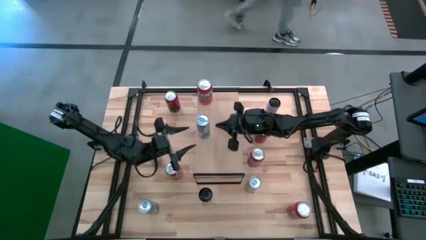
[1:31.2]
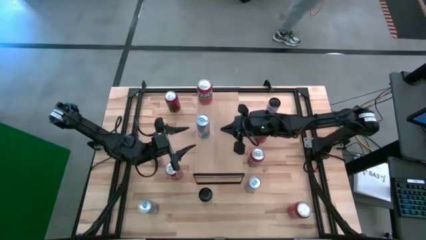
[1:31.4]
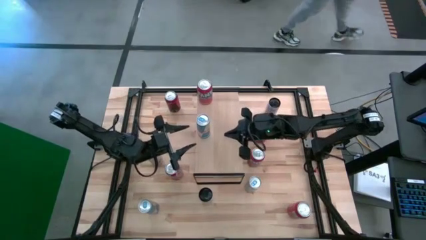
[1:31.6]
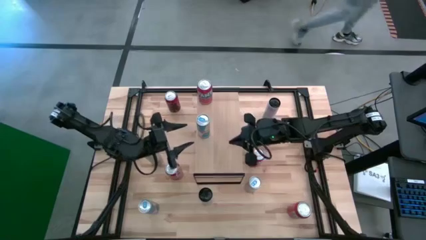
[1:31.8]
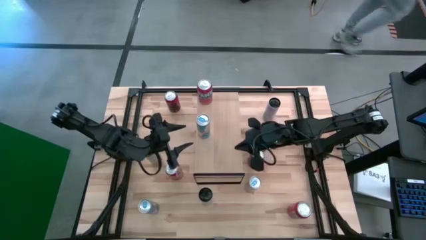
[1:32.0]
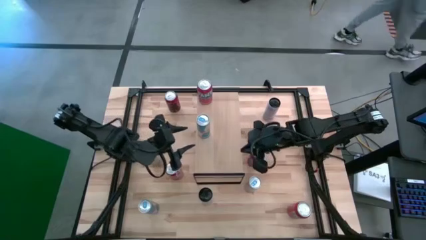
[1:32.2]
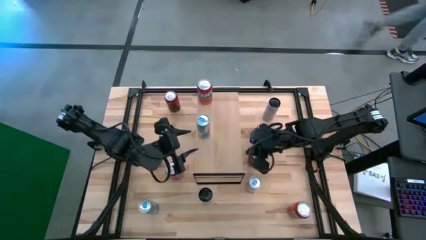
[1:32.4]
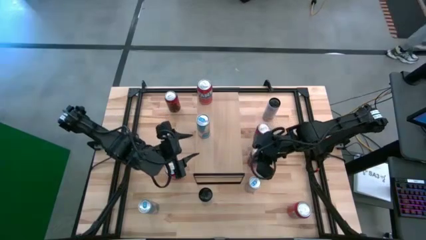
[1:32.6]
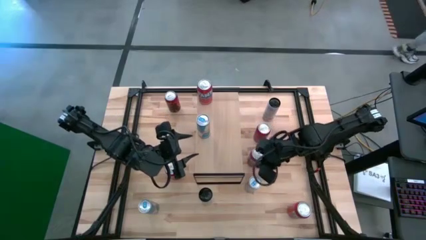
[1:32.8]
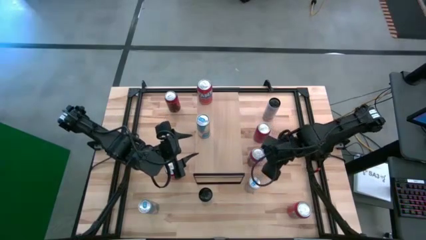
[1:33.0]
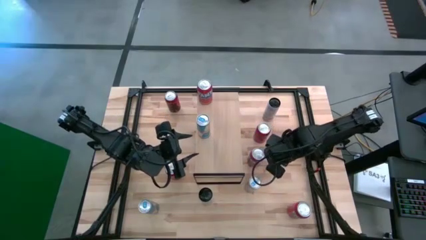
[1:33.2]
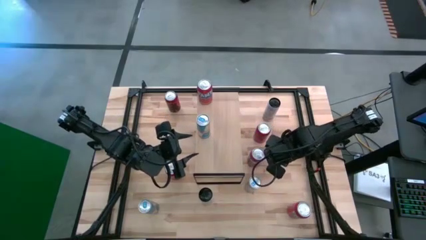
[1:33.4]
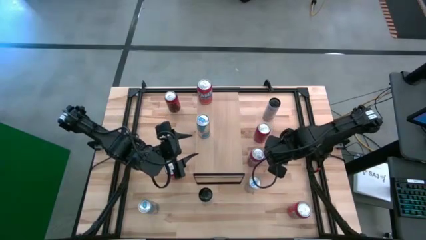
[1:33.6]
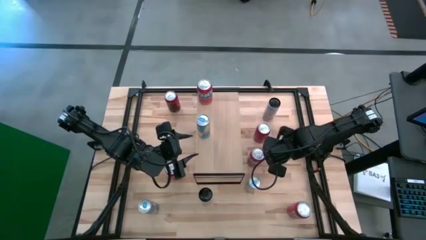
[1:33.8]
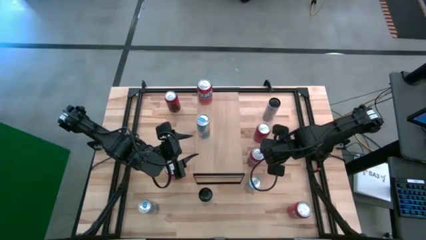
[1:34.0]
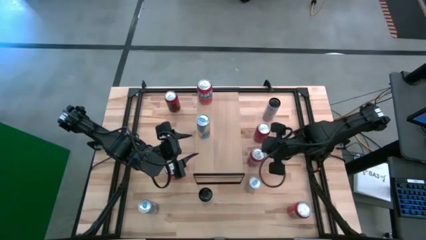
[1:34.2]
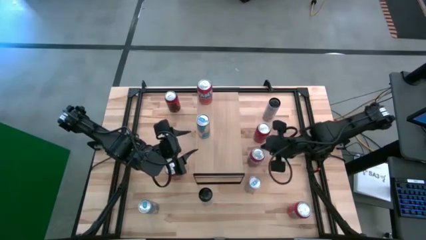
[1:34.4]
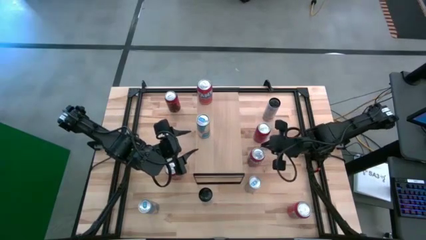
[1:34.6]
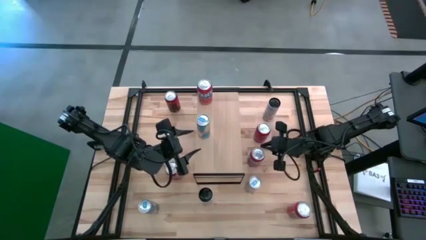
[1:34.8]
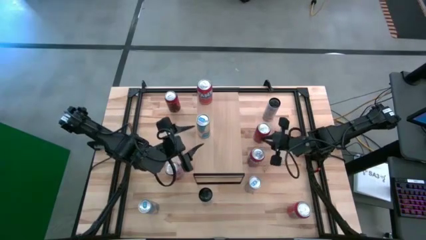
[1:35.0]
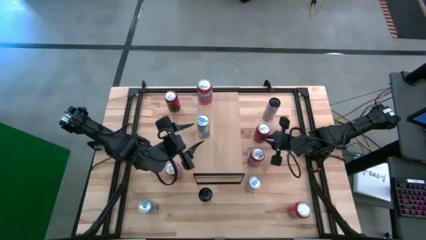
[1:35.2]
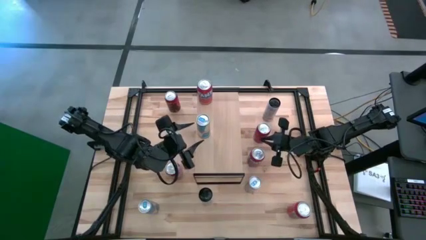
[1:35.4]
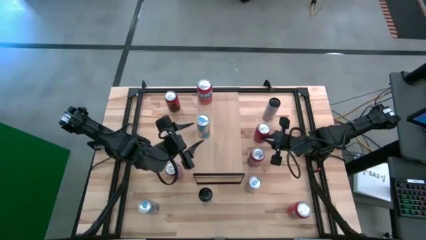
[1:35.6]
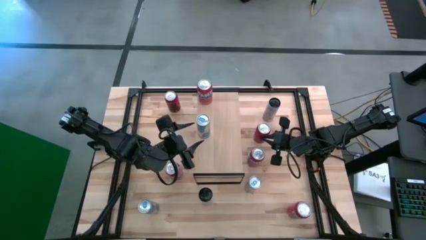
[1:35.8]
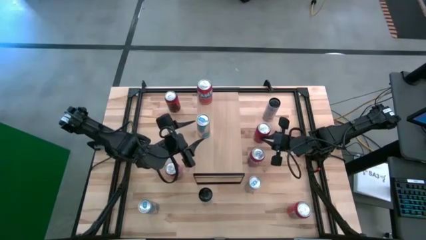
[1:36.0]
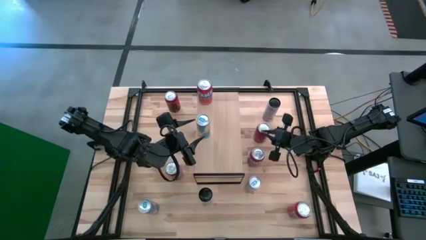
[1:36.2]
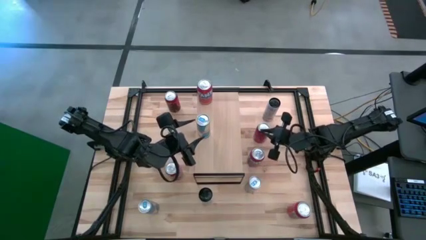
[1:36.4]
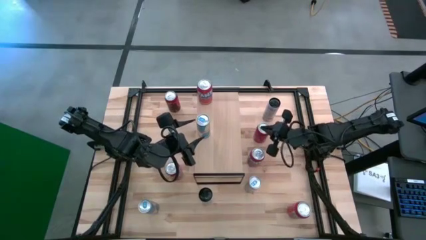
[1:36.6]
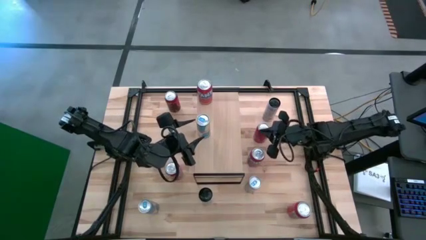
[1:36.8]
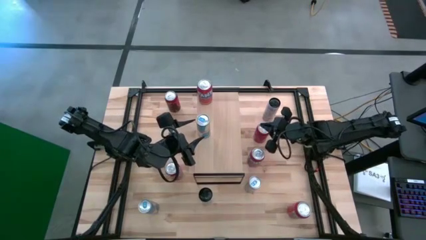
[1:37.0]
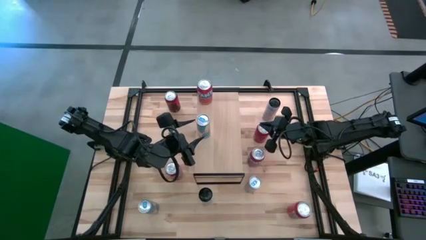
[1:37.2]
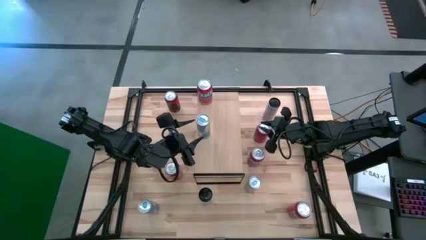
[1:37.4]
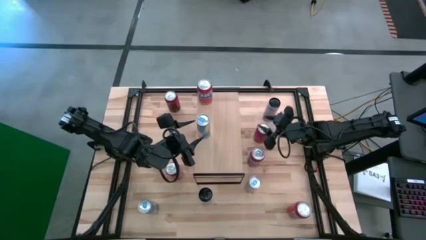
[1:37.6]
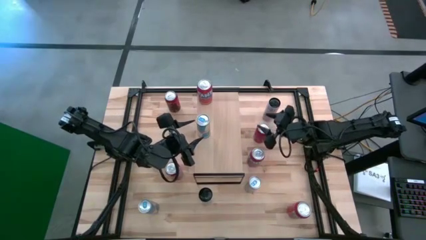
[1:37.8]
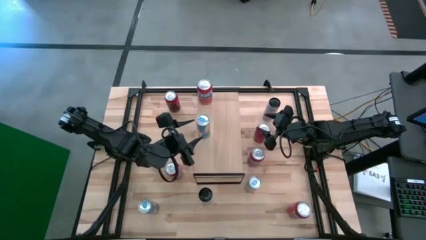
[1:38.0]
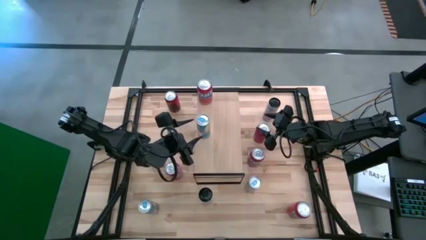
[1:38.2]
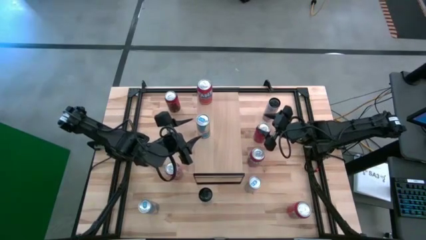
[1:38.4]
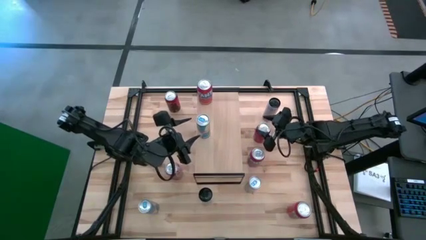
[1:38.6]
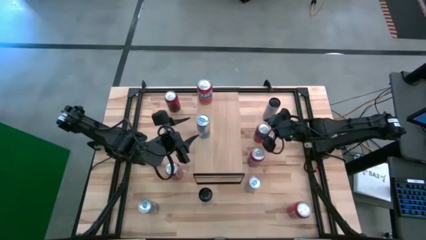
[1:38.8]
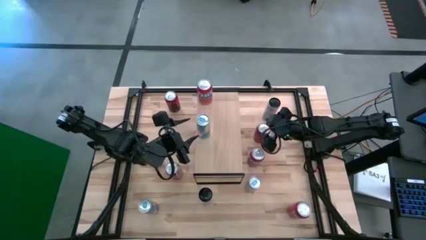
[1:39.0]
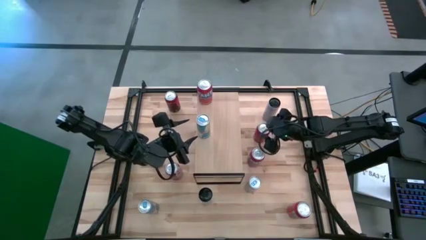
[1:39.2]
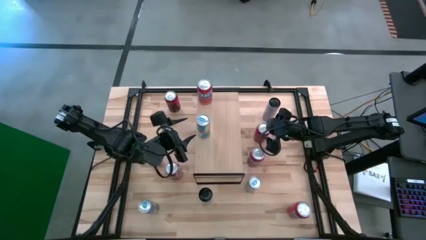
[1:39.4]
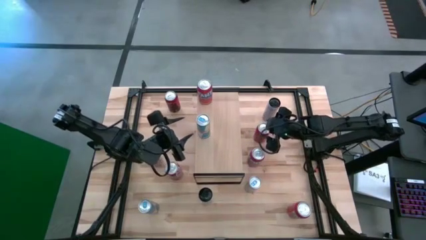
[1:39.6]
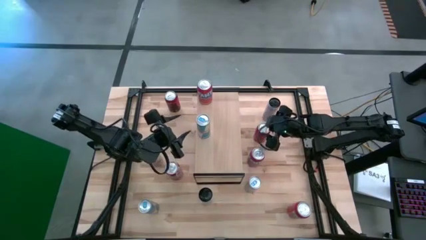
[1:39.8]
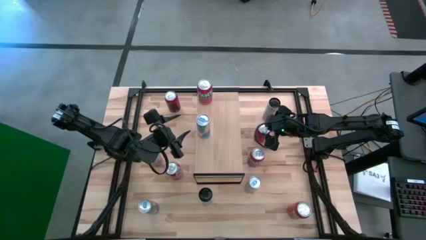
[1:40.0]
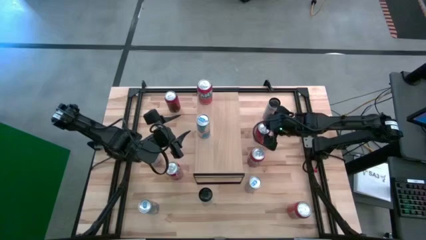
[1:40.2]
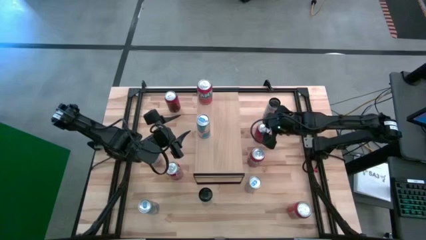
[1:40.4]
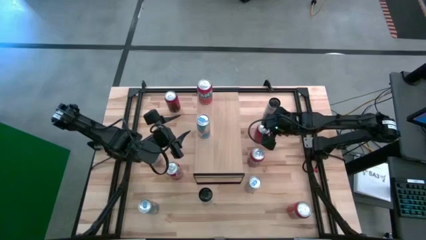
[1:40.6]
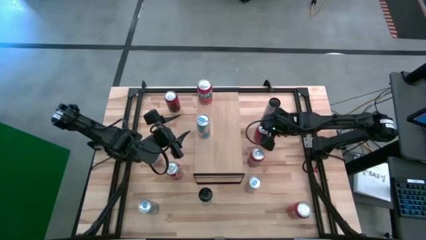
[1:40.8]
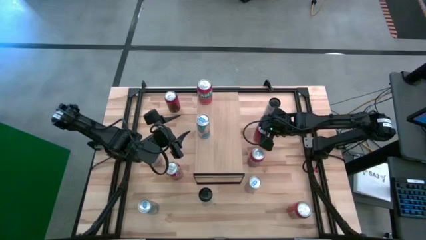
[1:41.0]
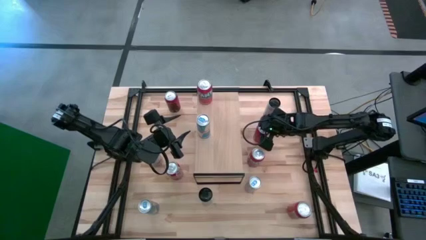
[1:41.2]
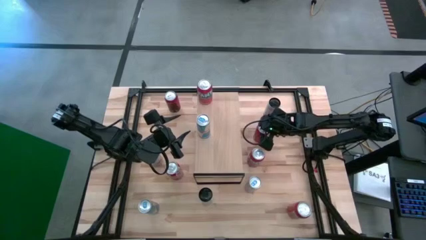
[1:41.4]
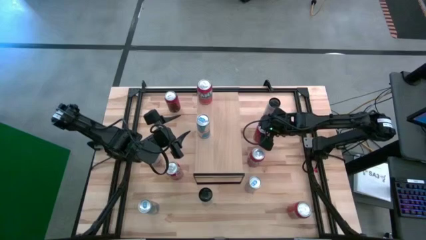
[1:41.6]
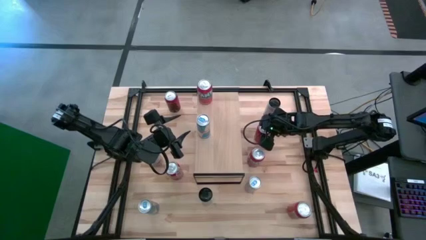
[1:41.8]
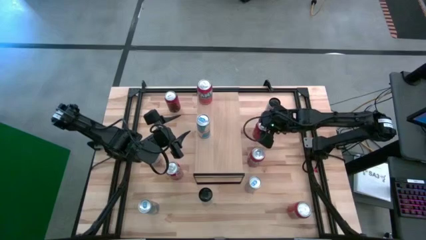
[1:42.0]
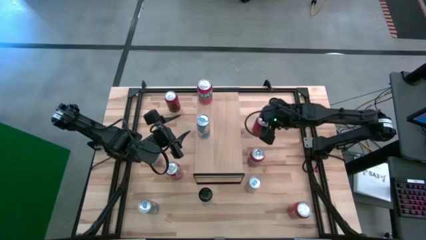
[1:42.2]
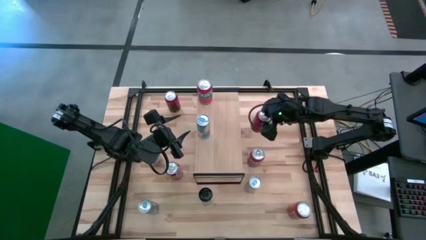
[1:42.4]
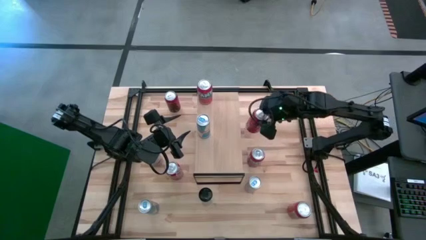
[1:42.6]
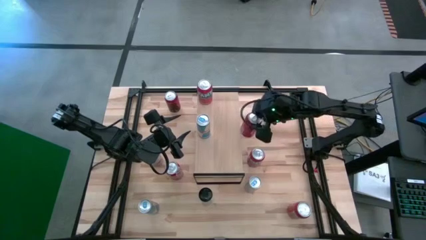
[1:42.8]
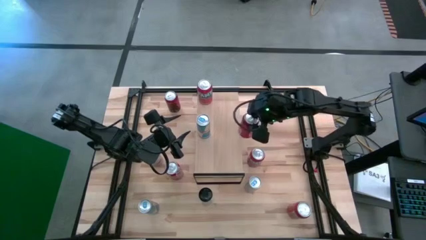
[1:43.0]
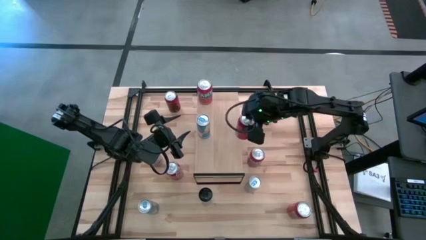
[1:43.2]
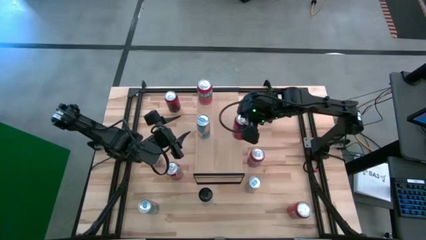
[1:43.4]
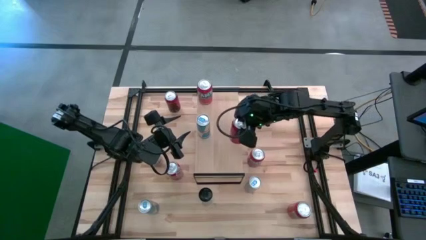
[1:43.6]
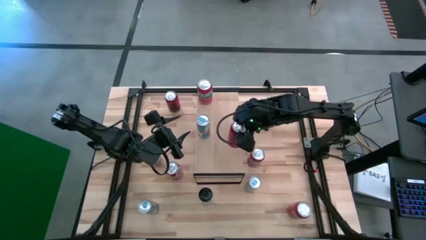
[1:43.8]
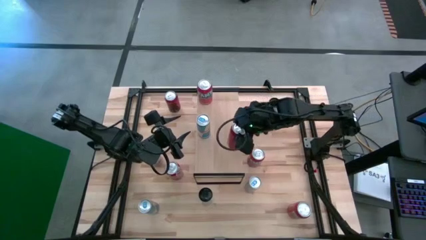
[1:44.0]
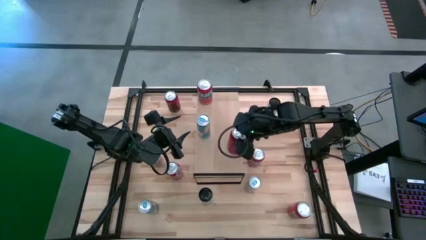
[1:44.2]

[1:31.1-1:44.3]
Task: Place canned beverage on shelf
Put the red and black soda can on the right shelf
